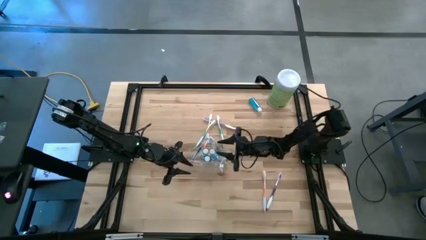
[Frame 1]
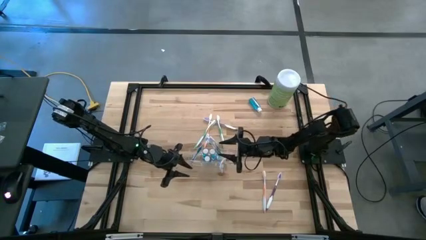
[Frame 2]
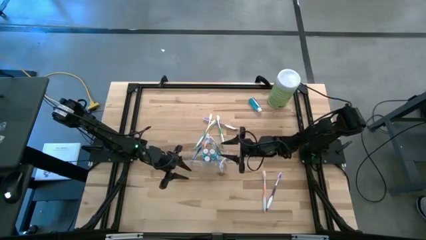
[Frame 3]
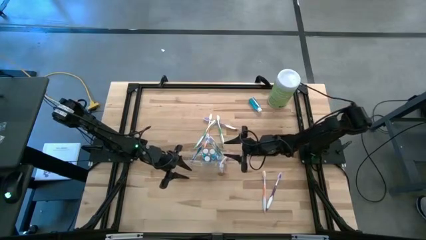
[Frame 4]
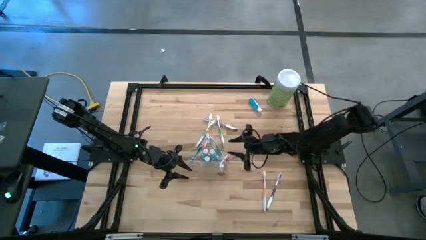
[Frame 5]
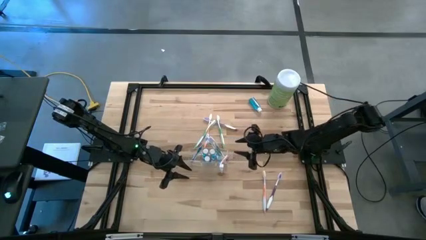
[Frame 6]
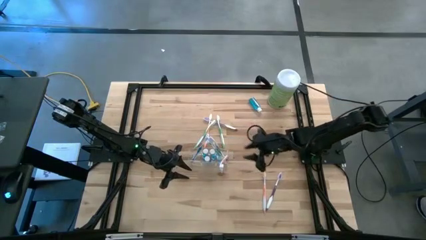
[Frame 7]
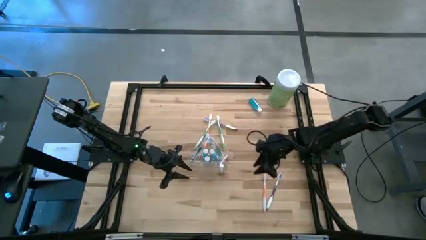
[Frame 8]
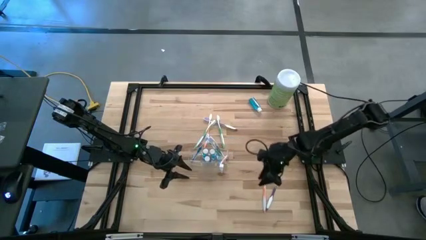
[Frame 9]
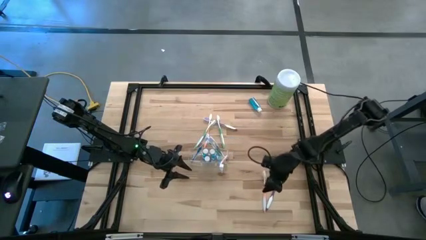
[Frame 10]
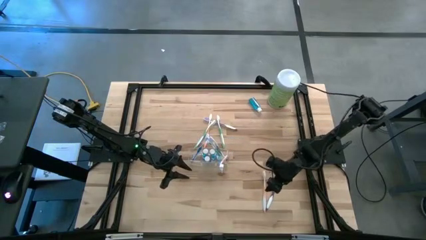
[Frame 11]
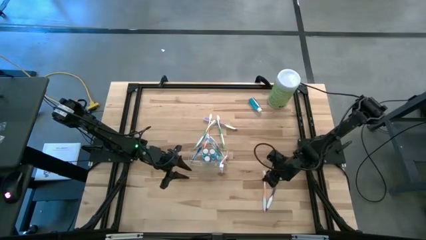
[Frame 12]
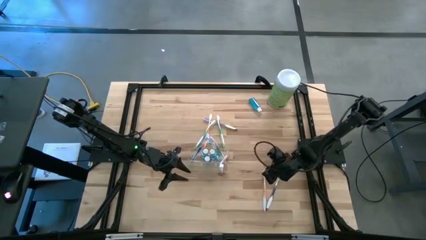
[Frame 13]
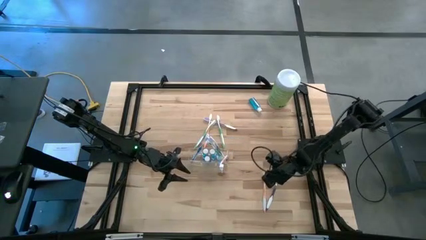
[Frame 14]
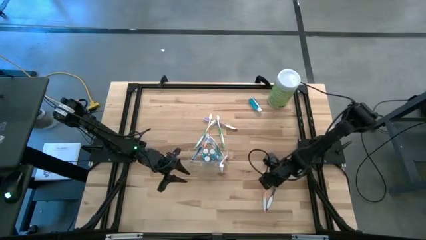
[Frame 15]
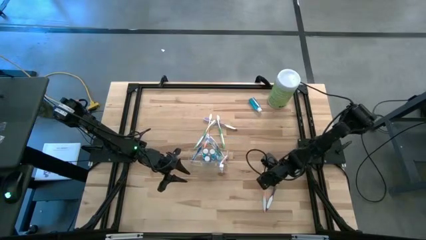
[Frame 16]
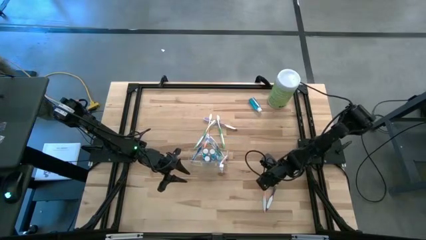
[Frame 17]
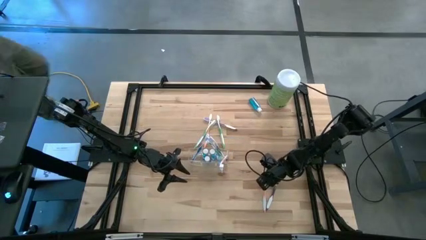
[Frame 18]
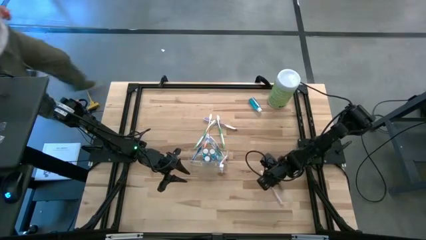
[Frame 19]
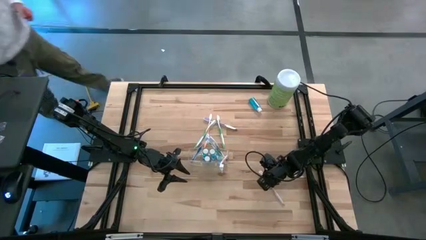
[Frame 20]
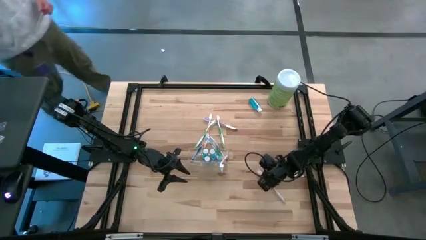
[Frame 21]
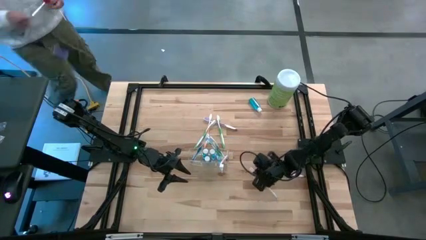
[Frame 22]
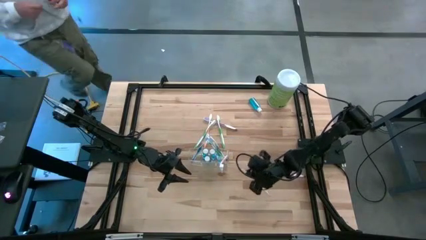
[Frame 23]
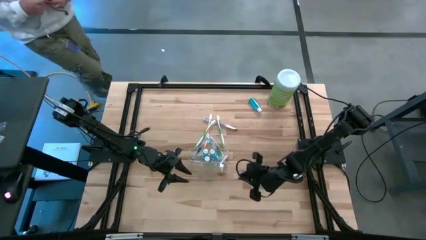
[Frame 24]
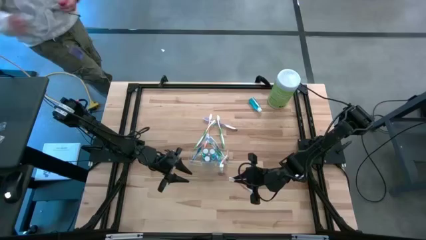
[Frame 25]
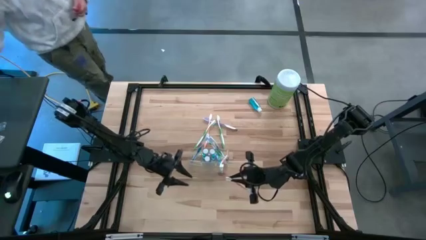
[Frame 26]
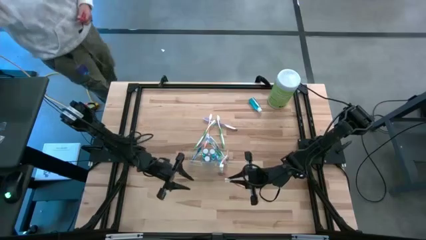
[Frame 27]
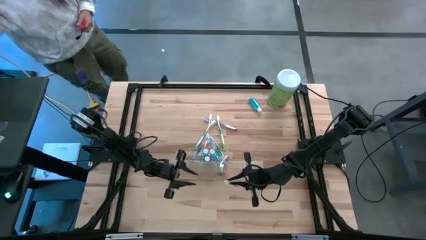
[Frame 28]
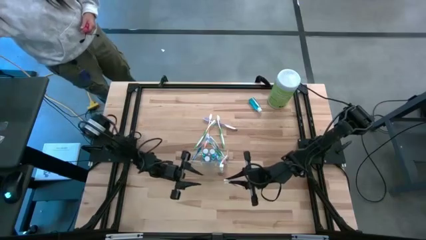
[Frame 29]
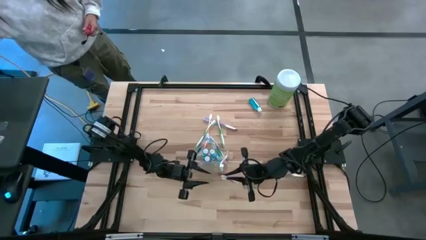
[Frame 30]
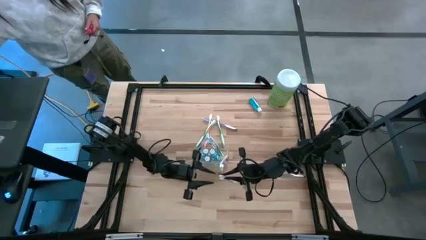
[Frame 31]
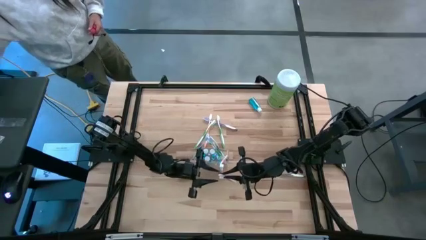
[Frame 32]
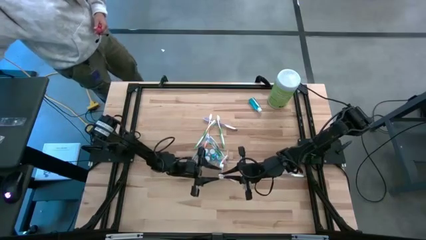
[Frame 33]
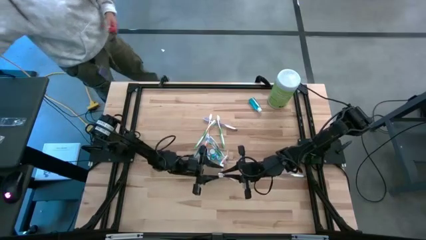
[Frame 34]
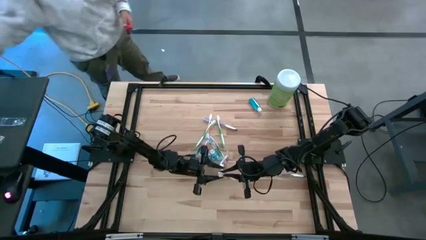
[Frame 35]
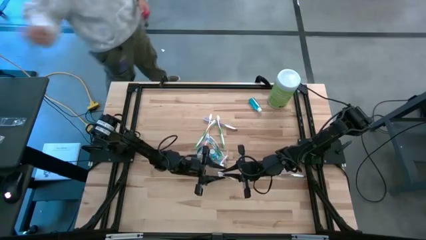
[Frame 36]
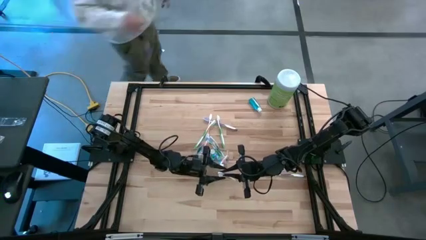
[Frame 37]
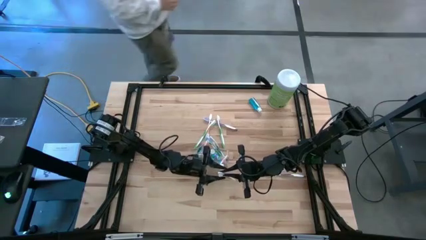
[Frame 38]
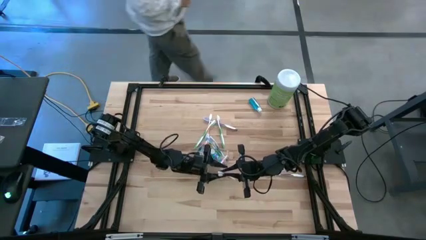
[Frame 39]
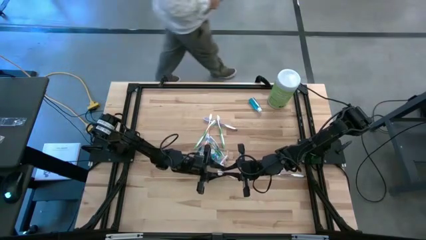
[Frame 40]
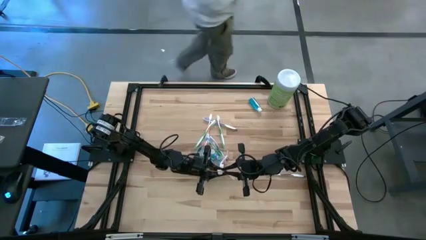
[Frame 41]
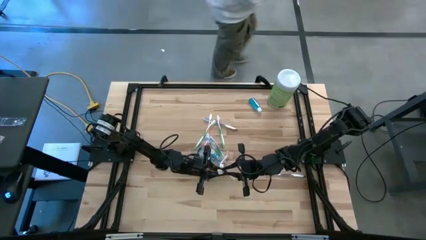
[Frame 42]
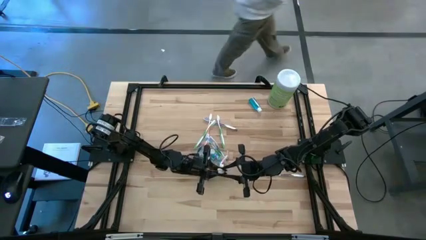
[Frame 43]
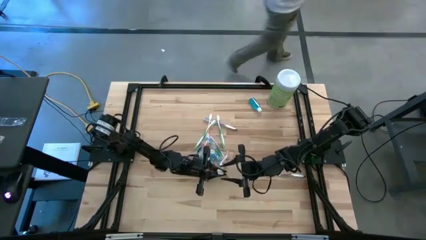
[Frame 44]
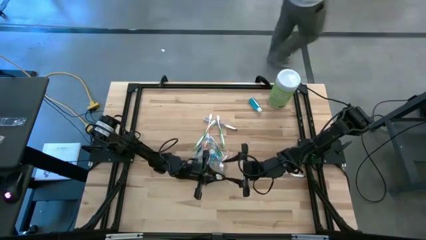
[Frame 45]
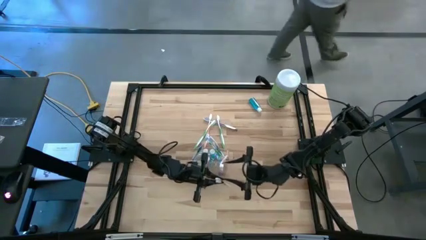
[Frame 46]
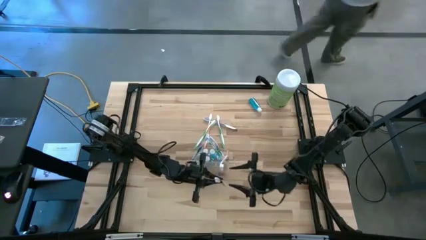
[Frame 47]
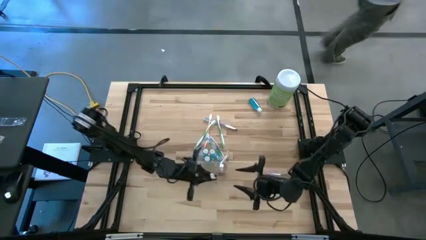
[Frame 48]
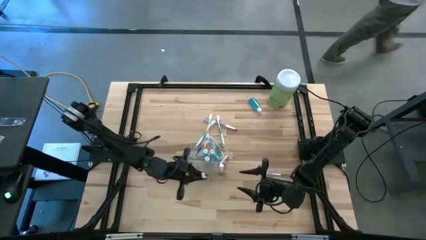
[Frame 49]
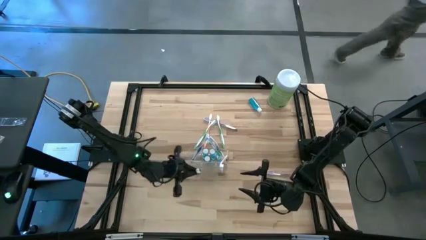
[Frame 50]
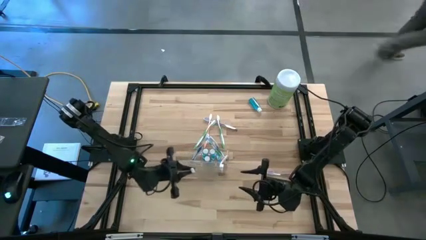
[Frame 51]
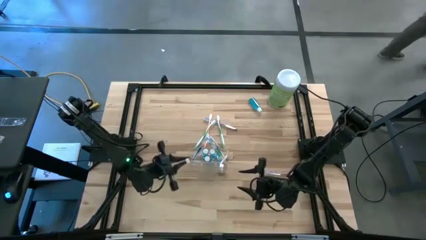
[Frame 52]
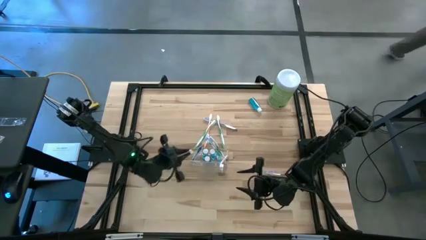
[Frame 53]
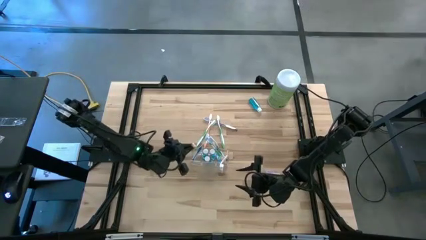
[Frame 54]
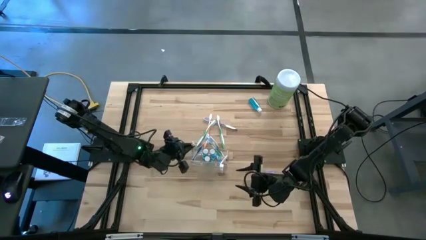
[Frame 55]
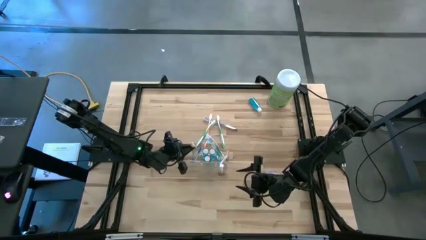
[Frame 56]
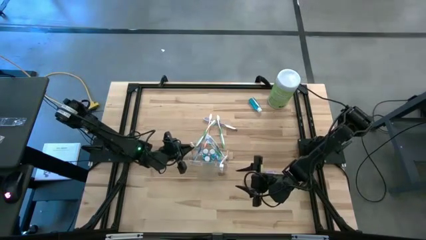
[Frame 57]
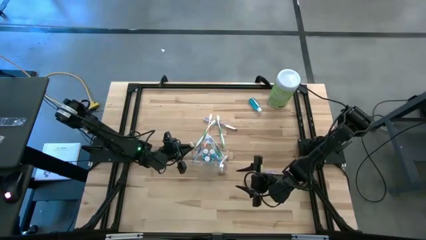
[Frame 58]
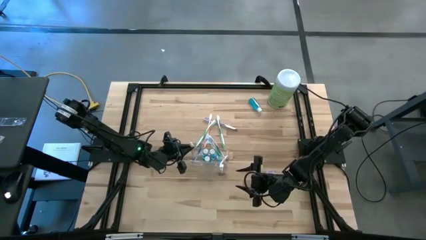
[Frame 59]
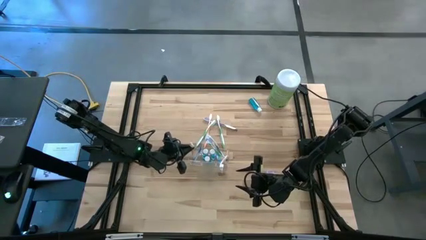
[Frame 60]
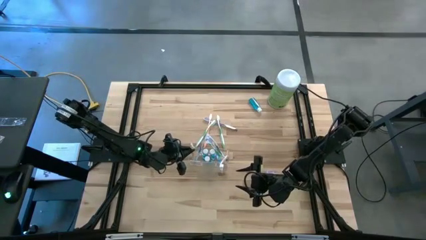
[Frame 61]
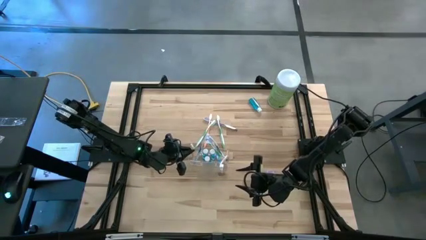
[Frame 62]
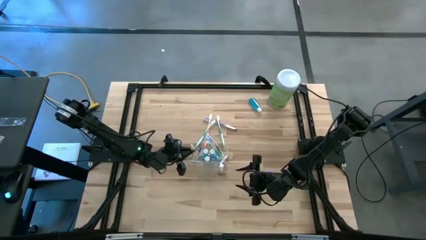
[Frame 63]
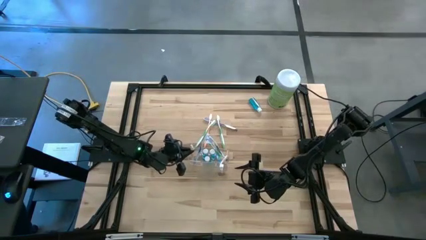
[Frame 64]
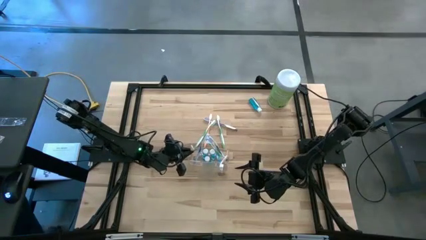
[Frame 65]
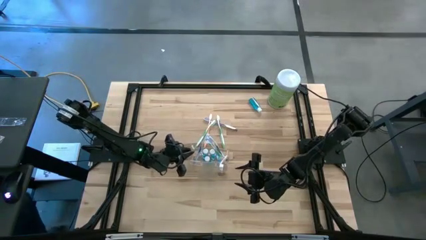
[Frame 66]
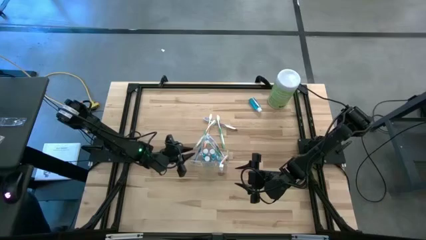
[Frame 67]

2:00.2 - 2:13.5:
Task: Pick & Place toothbrushing station
Put the orange toothbrush into the left side of the transparent organizer
